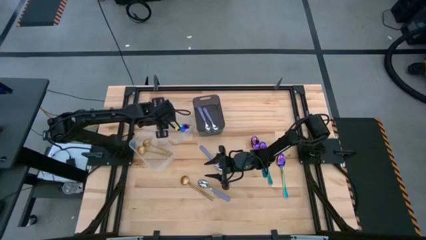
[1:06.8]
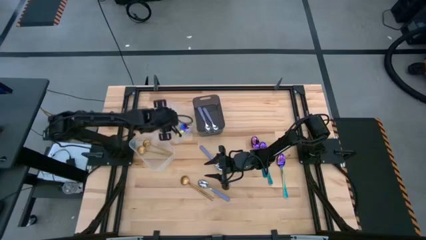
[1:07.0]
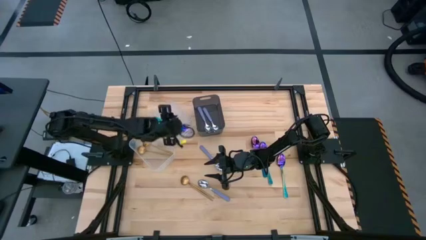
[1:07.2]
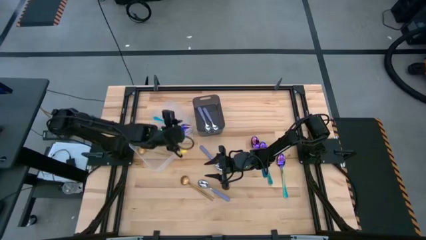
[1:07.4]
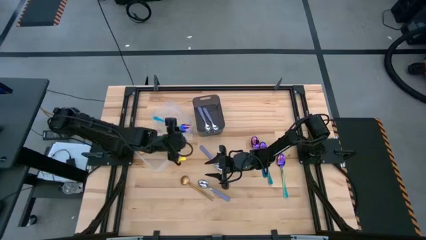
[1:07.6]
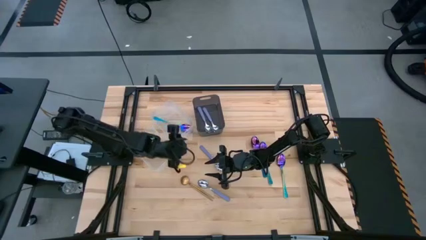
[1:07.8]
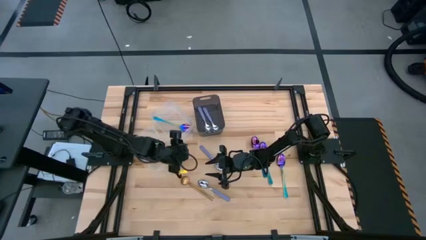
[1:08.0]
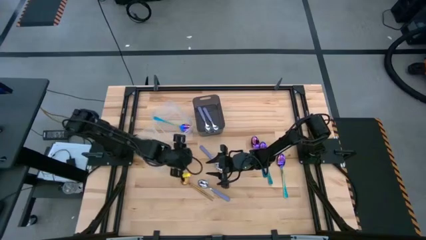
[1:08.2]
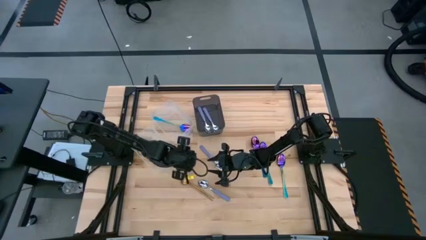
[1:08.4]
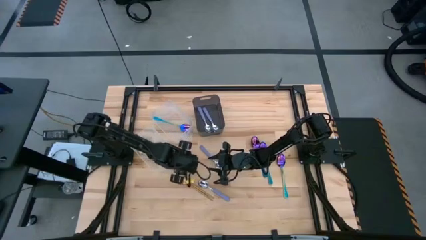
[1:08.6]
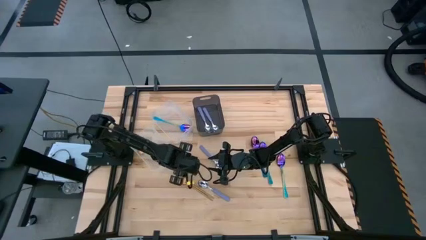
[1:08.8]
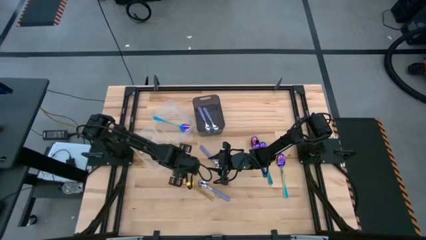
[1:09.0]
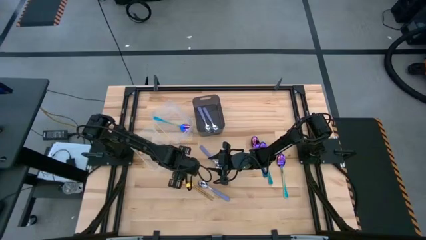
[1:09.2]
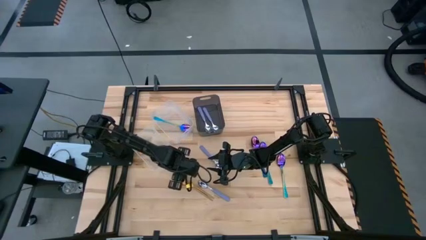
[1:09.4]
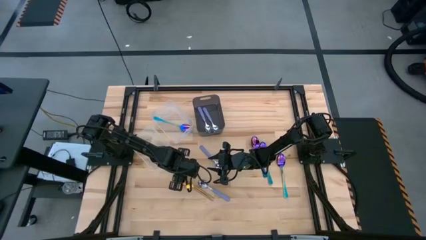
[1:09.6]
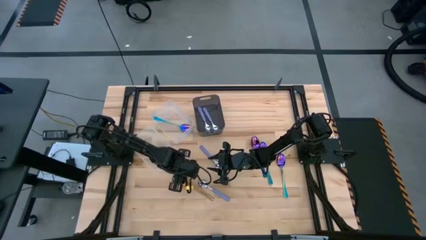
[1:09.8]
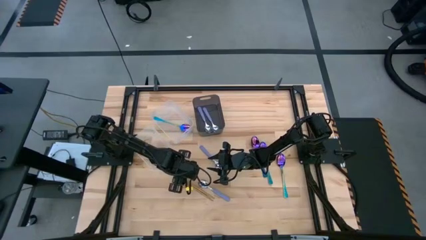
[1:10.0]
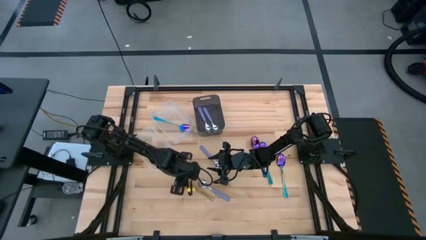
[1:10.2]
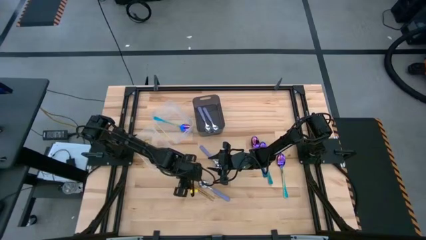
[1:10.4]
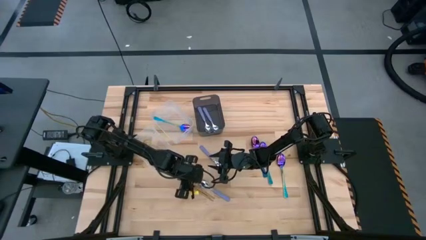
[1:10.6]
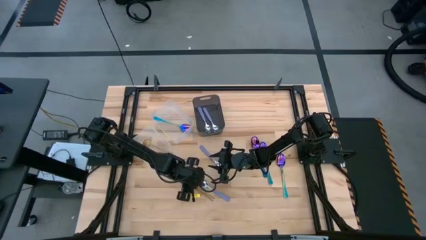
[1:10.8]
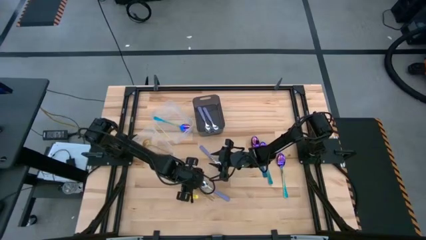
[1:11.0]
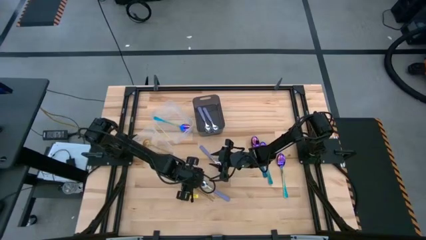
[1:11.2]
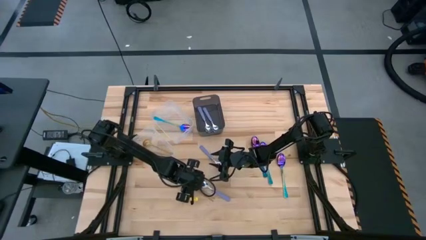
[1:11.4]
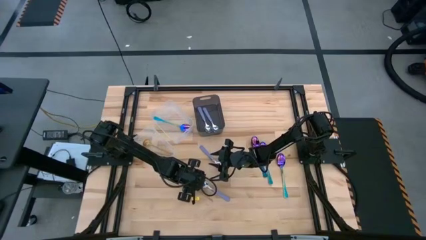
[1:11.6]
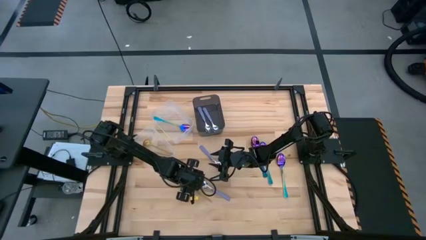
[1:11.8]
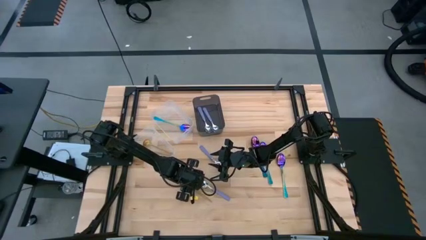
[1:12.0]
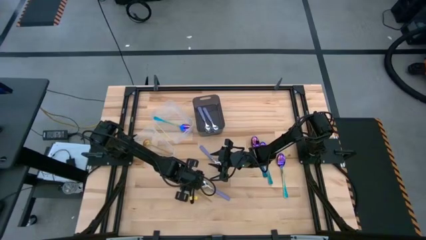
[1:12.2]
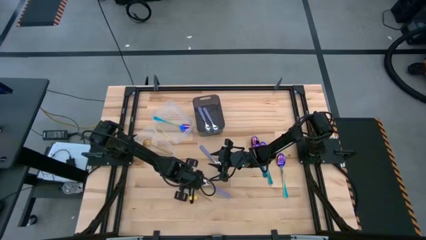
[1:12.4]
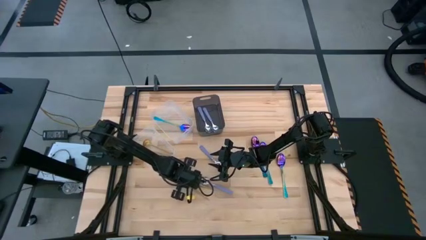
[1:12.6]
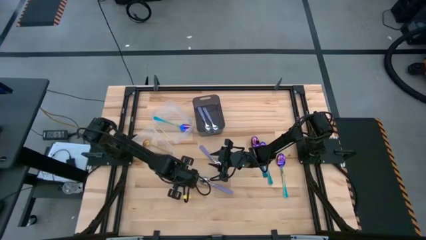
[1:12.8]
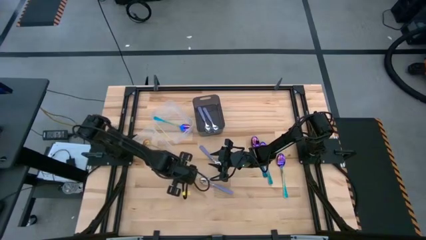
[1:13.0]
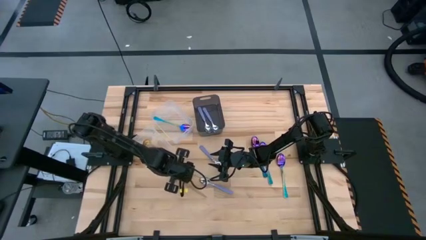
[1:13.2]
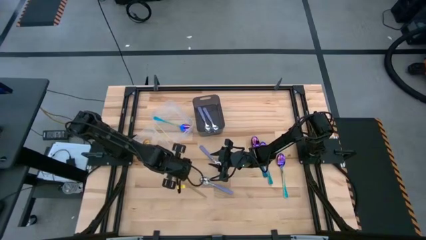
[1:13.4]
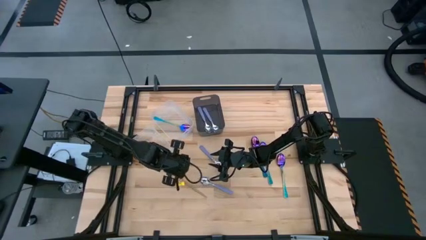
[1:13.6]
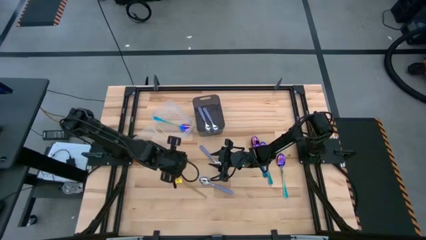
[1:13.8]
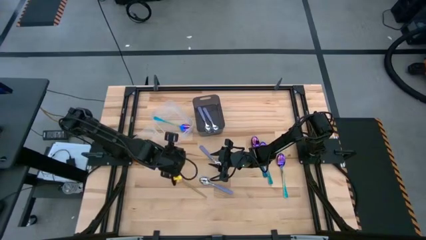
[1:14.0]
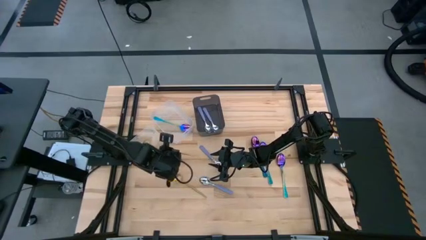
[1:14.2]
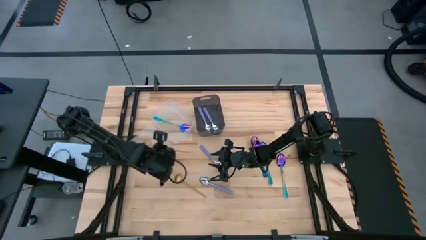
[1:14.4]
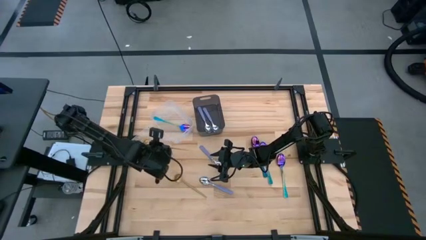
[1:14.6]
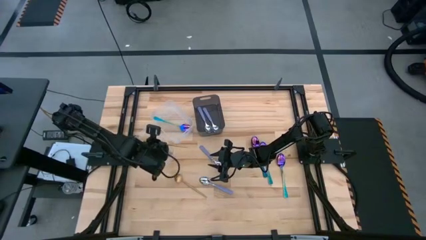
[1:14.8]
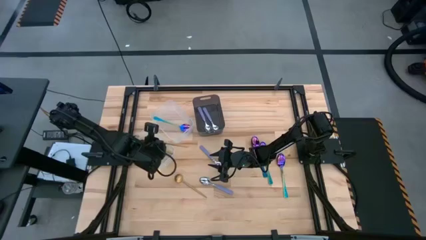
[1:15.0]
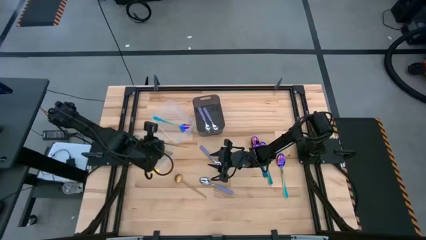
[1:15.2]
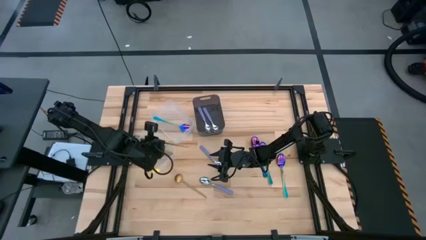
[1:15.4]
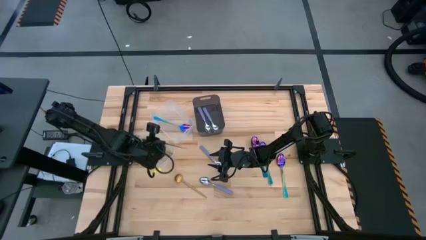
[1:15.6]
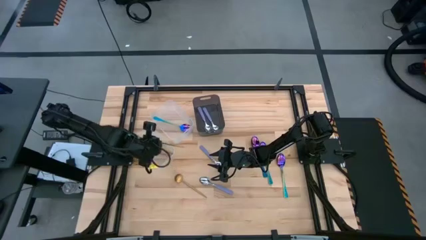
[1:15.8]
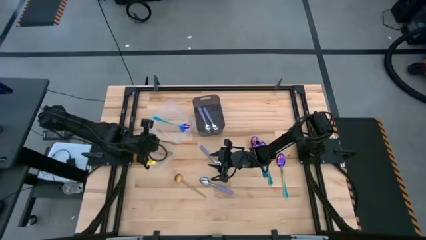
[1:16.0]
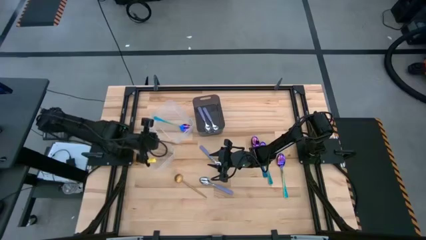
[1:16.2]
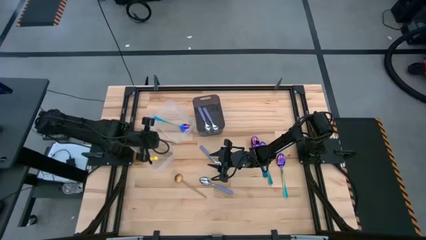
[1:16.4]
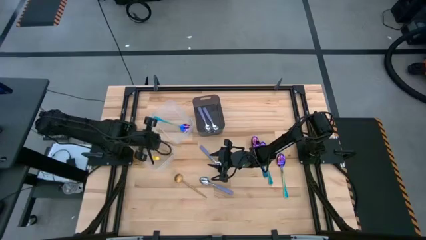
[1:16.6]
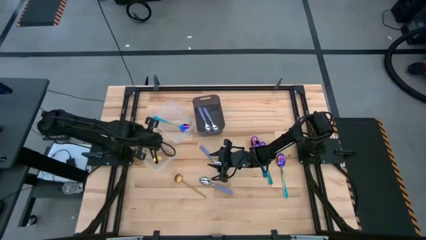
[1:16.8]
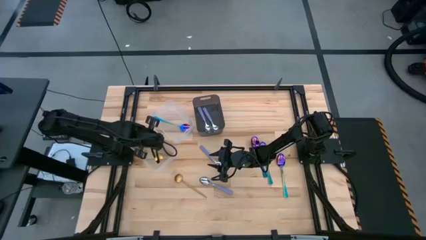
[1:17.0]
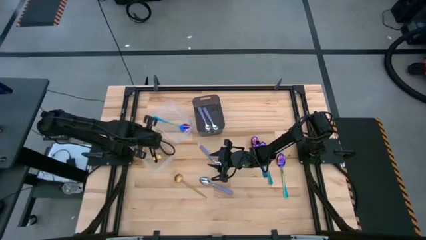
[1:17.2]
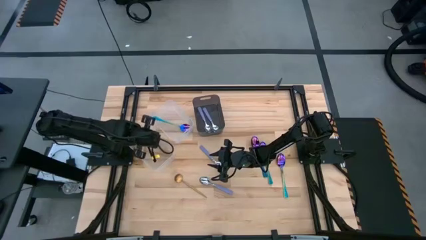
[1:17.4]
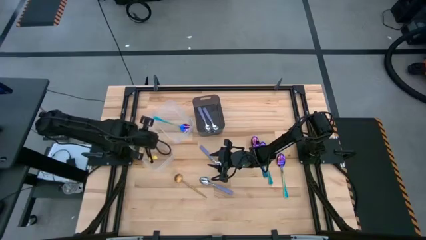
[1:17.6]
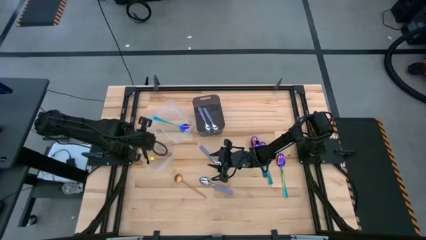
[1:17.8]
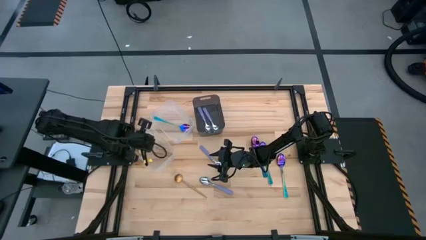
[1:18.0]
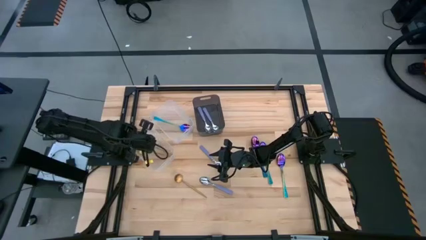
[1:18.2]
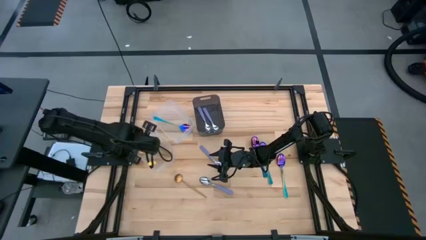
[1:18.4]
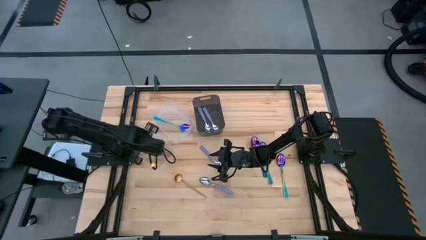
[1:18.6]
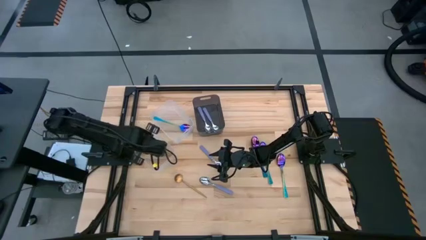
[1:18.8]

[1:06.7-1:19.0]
Task: Sort silverware by color (type)
Put the gold spoon into the bottom transparent bin
